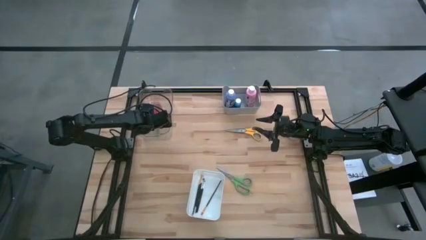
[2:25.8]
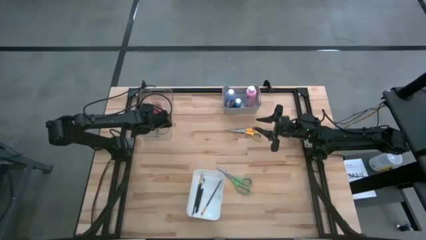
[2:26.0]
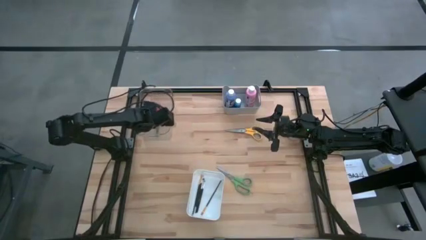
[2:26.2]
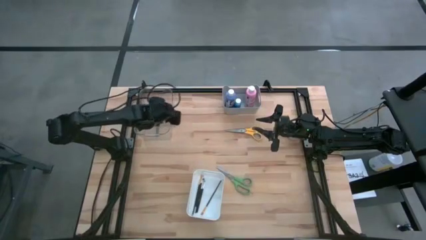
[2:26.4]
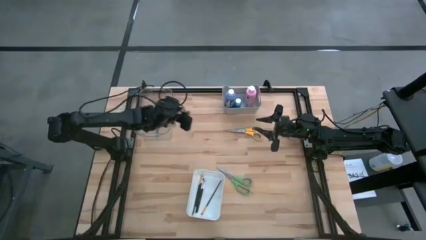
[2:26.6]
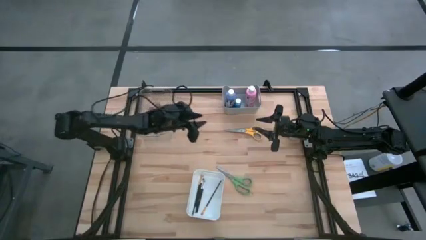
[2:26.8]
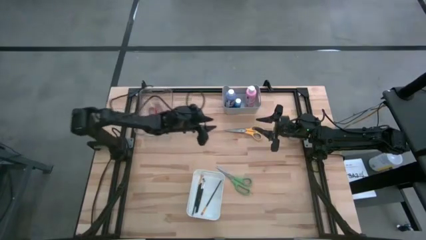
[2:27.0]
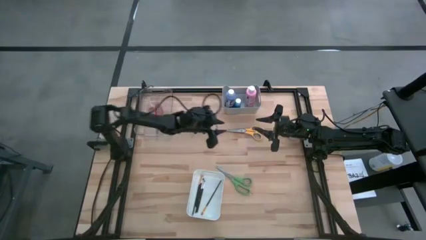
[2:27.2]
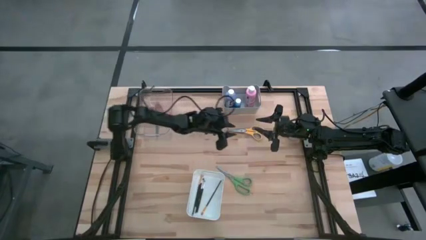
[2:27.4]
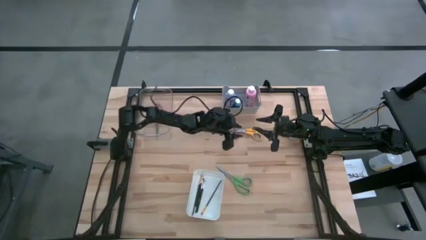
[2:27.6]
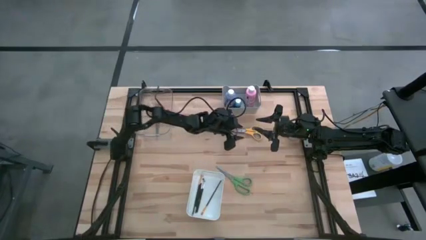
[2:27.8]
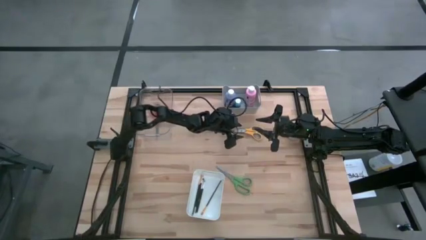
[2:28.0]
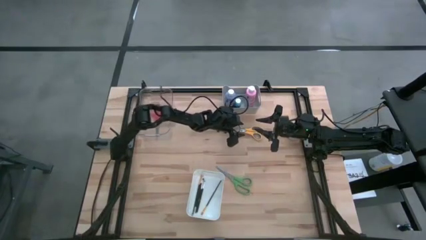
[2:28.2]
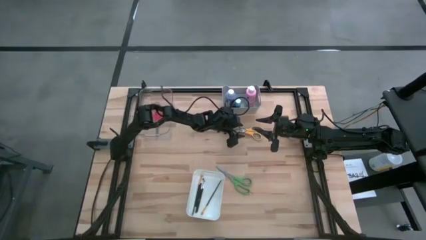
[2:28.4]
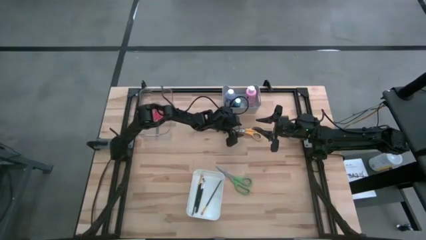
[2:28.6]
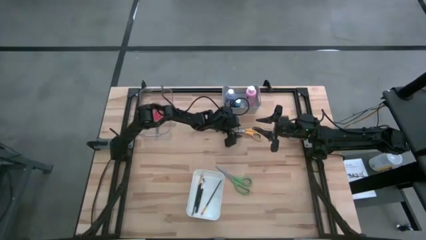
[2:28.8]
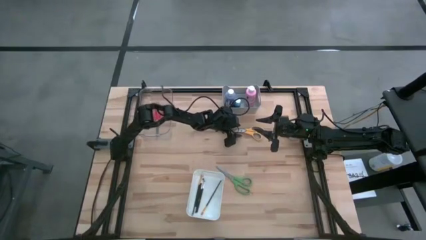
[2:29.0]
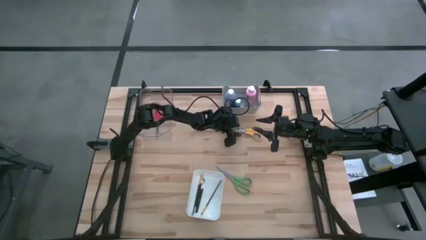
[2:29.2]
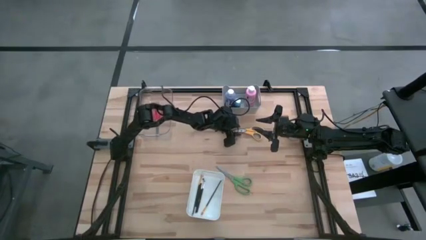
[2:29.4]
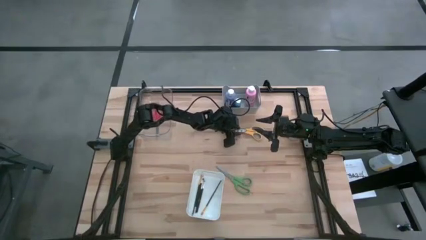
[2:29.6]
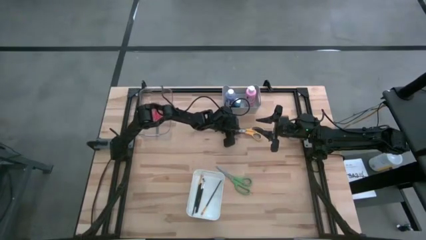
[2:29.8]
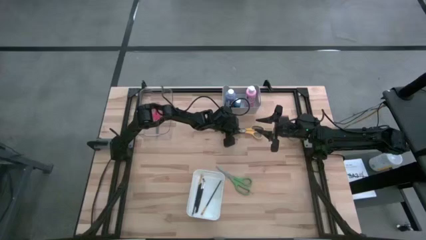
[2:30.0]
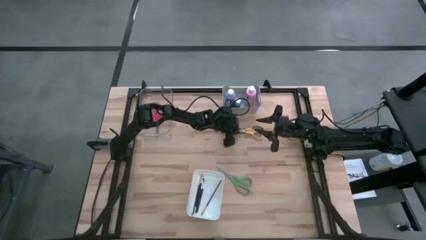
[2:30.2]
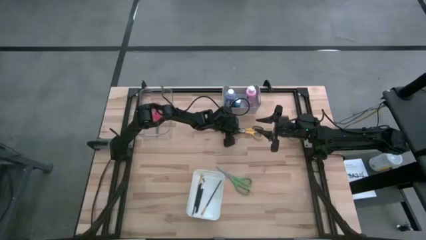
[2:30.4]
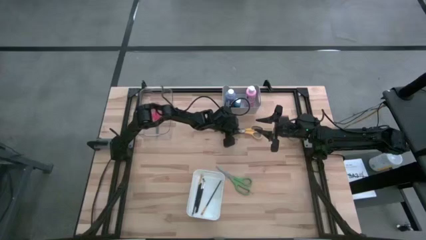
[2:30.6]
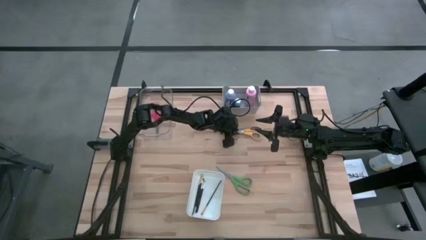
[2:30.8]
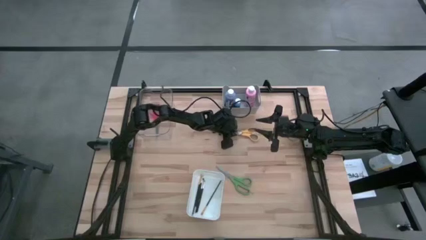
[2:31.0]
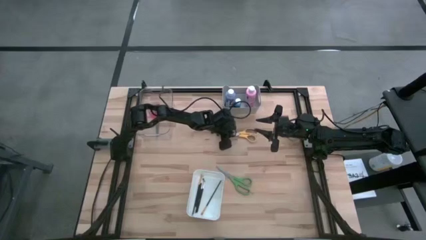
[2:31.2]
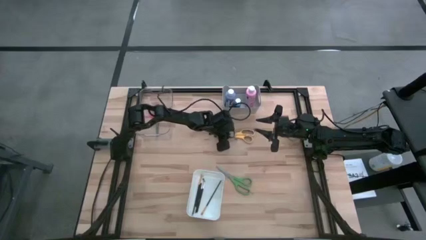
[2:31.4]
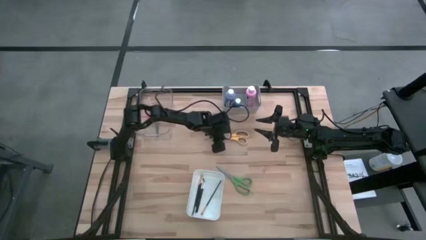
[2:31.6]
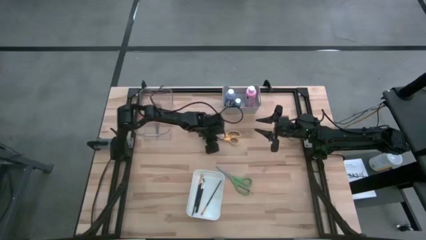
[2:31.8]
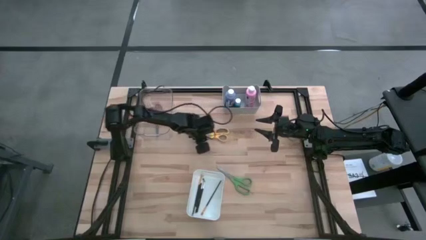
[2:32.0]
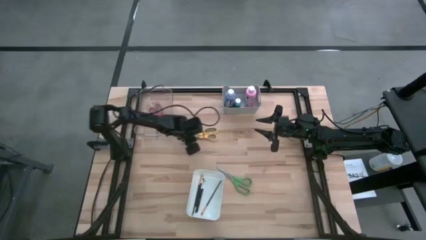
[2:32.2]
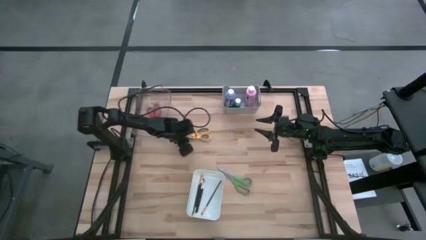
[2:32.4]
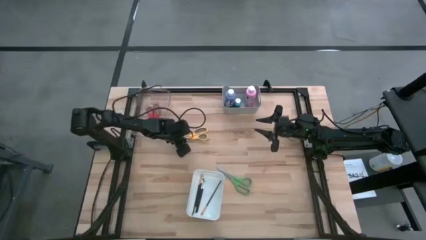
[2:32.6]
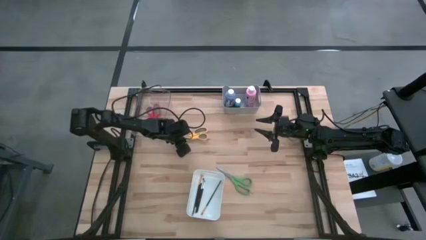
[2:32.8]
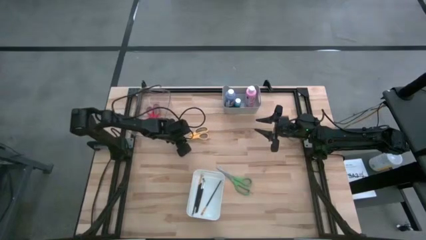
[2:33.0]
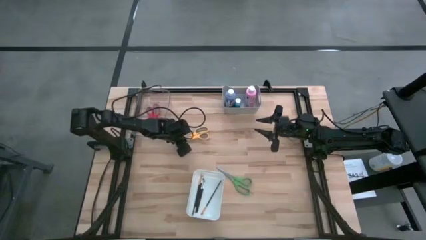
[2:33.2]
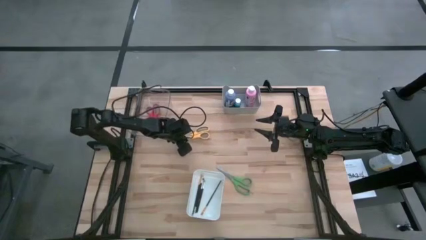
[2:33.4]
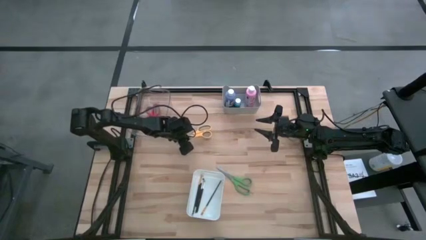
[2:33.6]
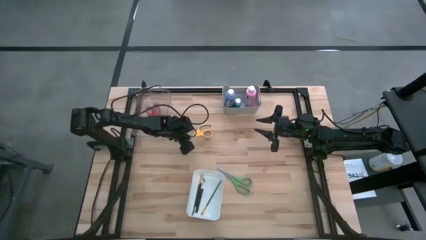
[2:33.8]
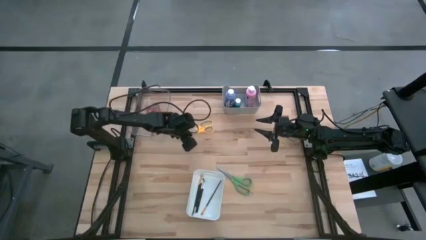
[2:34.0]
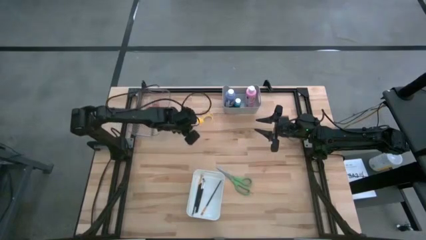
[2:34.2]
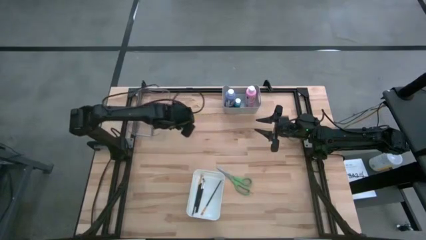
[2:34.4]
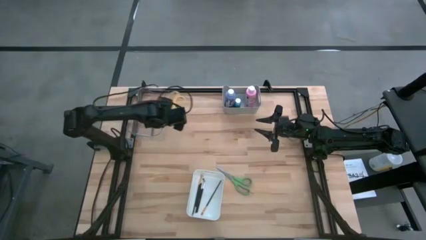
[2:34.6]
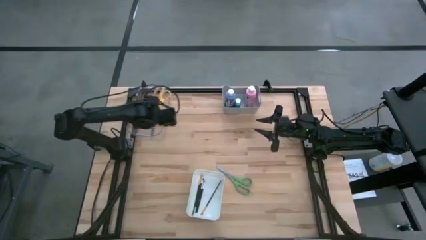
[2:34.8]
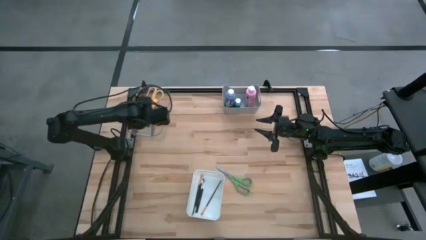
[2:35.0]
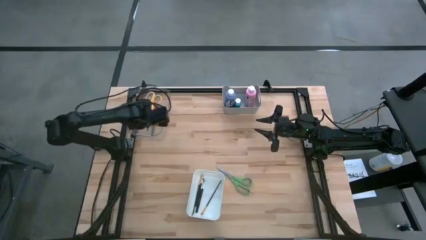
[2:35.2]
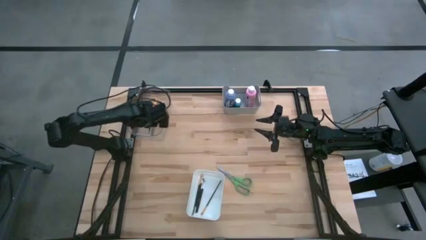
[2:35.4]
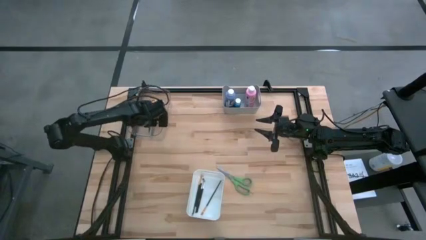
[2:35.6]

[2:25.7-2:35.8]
Task: Pick & Place Paint Supplies
Put the yellow scissor into the transparent bin

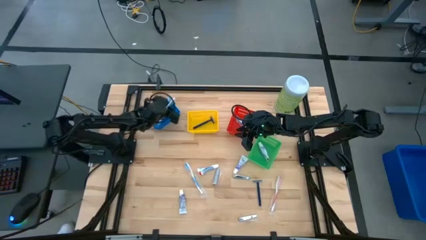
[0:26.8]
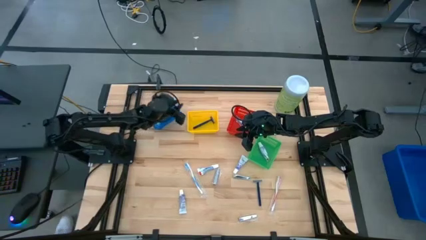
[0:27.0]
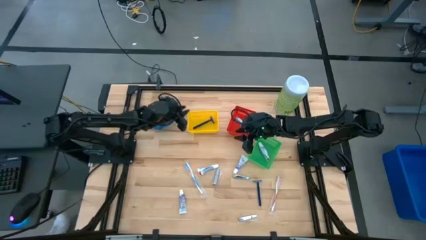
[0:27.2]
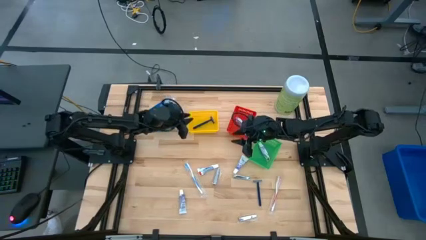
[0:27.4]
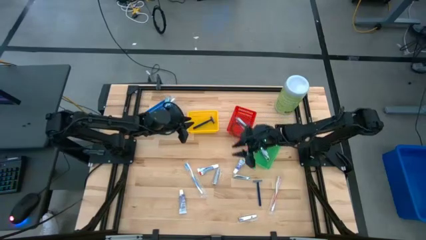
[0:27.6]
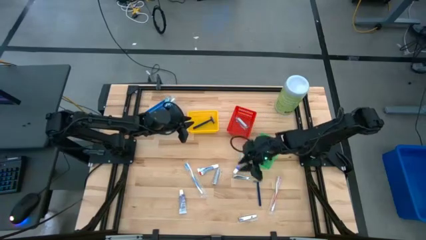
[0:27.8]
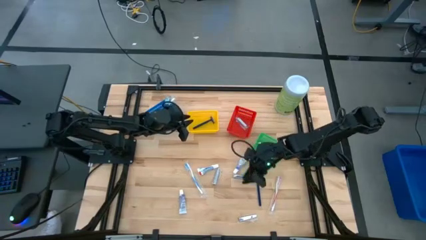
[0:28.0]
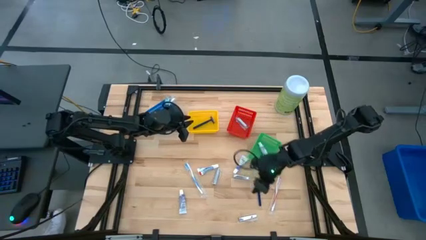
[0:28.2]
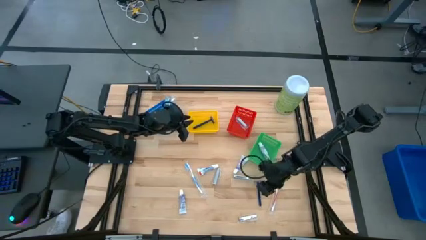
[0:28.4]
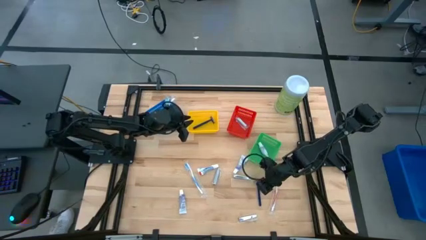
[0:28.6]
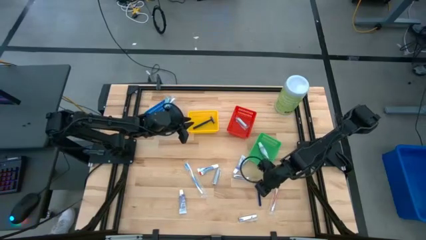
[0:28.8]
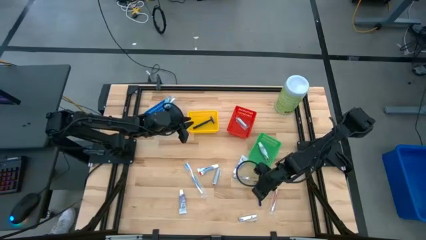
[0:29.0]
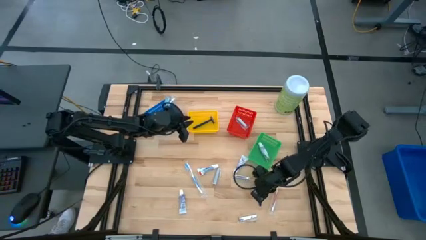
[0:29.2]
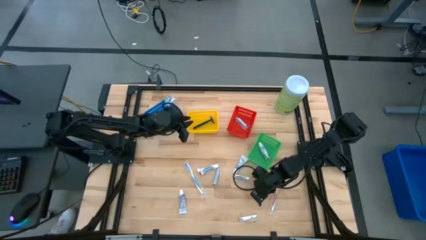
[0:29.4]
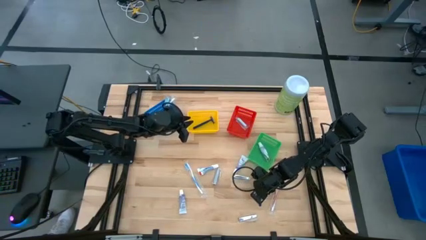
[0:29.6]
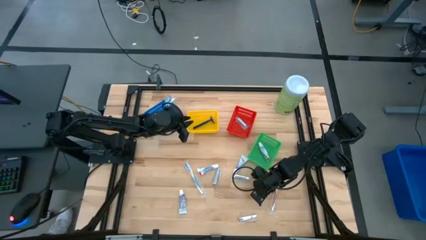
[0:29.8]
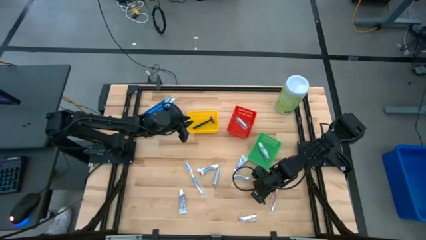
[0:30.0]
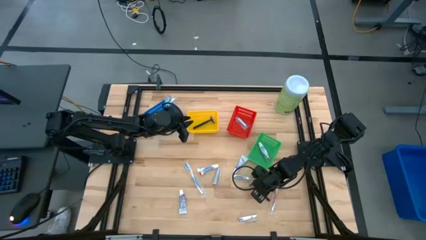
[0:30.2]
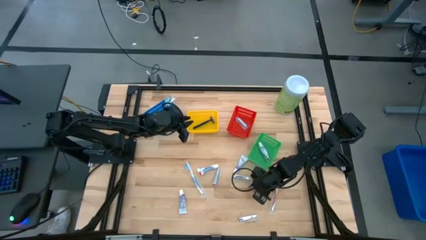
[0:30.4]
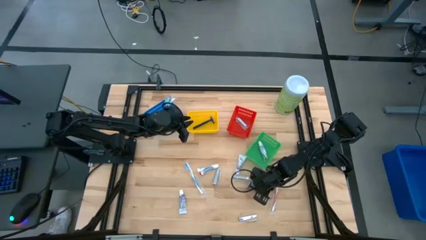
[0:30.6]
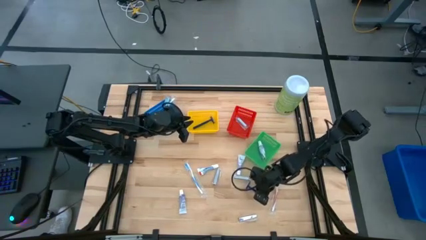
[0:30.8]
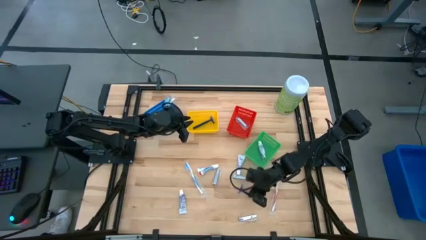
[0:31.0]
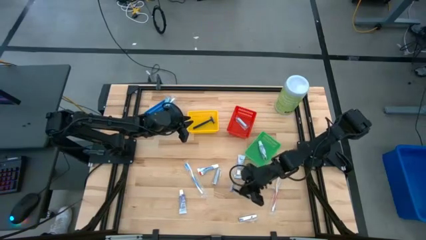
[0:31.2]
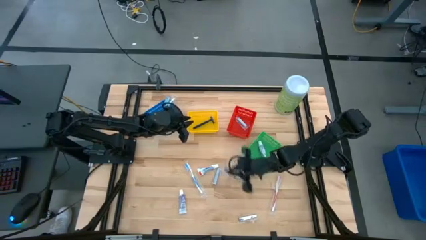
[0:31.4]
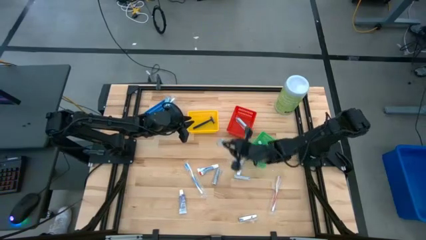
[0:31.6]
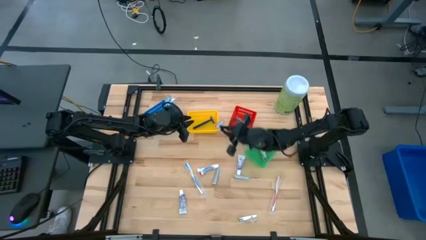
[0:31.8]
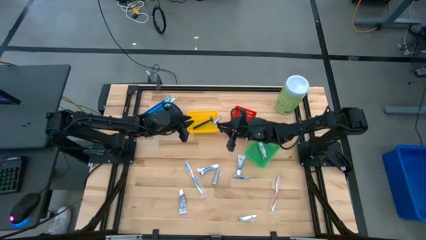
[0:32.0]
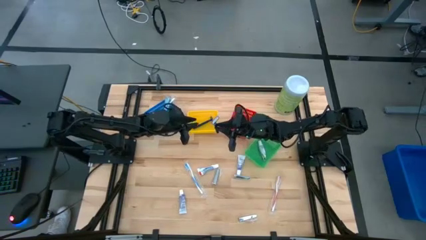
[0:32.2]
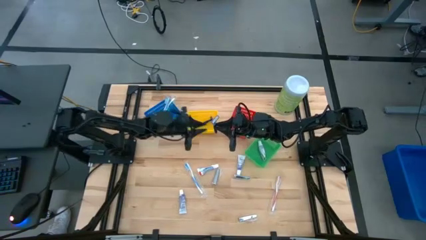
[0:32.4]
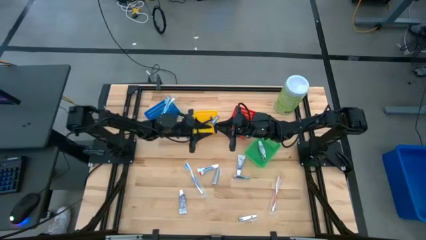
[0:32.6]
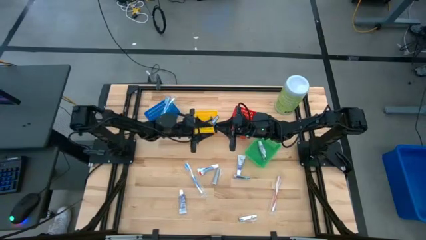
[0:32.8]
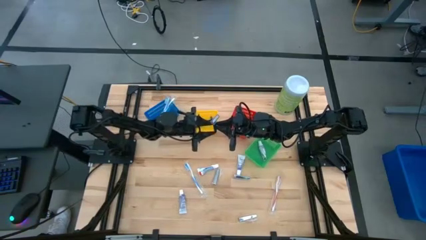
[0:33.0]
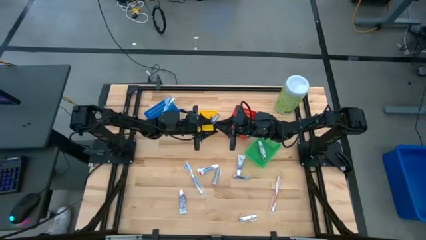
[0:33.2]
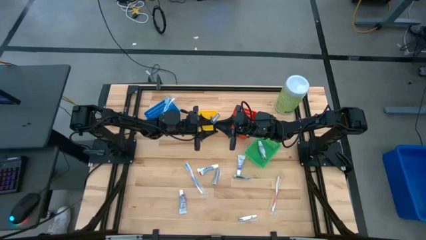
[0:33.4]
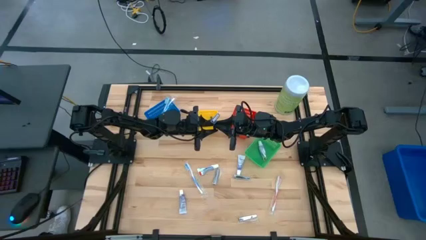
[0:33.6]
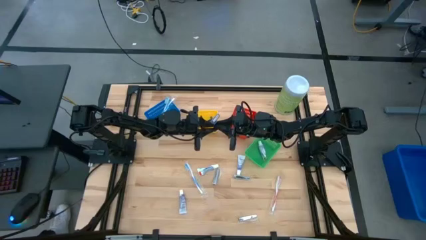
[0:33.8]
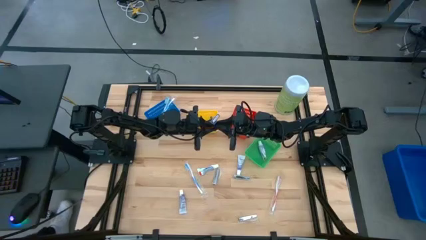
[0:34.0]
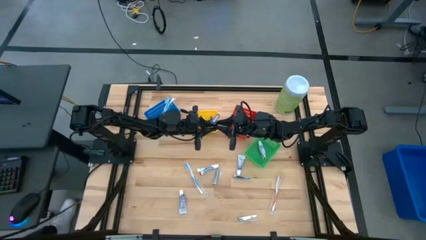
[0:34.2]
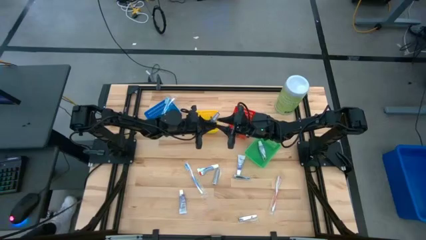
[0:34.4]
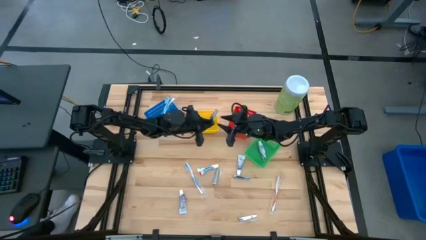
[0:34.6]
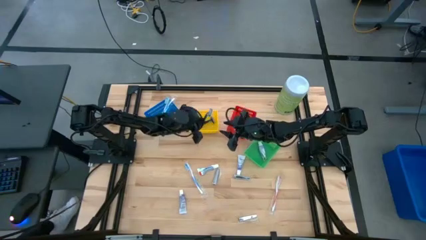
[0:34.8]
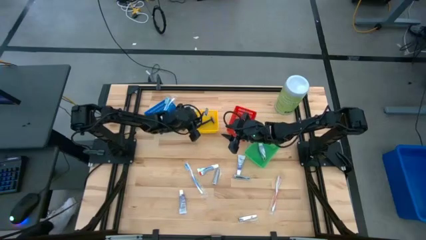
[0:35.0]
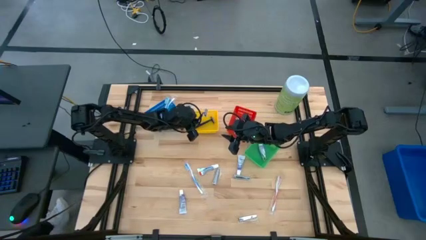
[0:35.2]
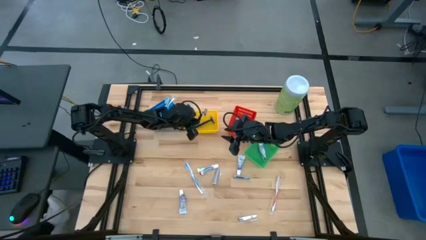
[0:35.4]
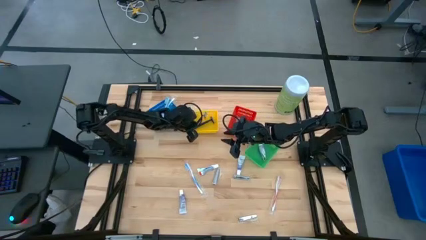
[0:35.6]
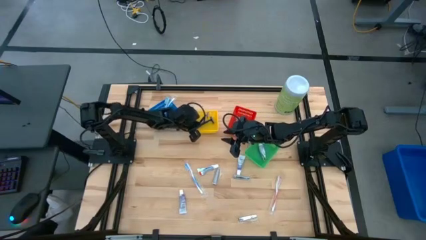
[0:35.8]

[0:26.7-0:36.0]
Task: Pick & Place Travel size toiletries
Put the blue razor into the yellow bin
